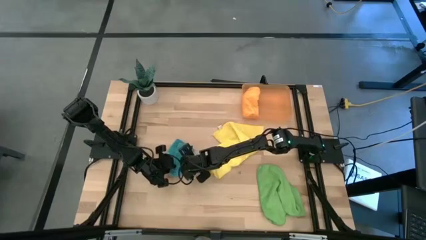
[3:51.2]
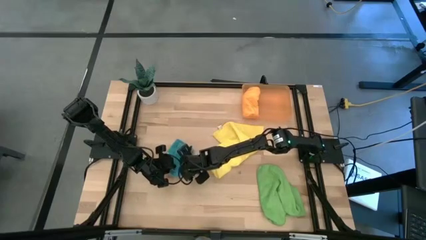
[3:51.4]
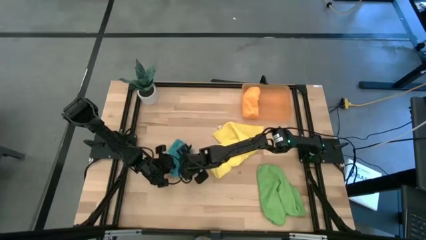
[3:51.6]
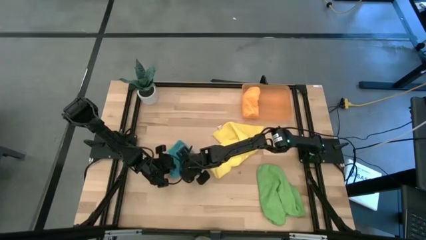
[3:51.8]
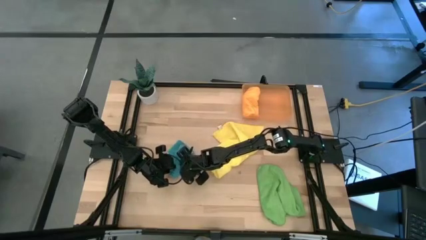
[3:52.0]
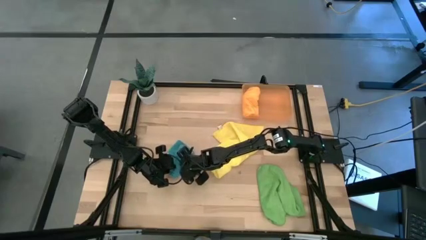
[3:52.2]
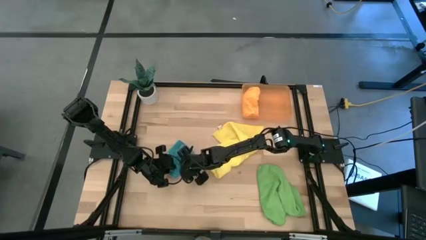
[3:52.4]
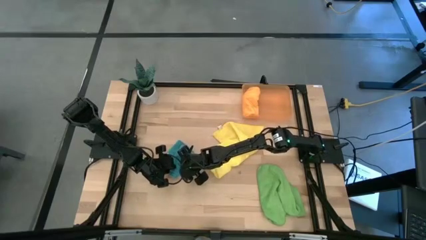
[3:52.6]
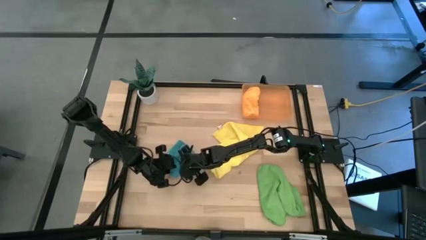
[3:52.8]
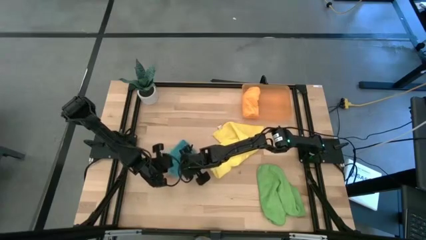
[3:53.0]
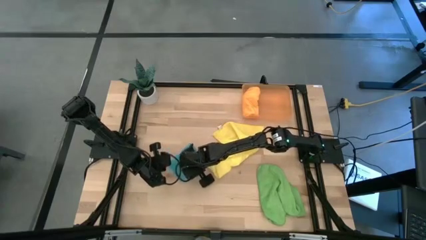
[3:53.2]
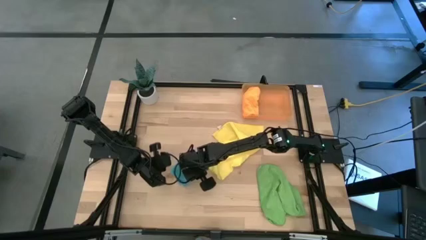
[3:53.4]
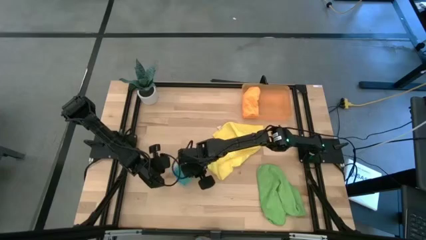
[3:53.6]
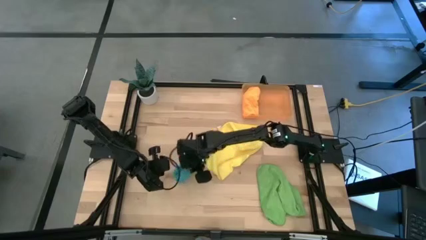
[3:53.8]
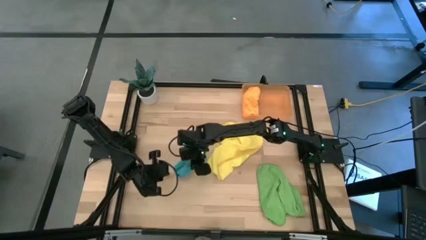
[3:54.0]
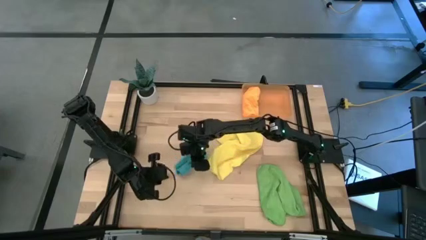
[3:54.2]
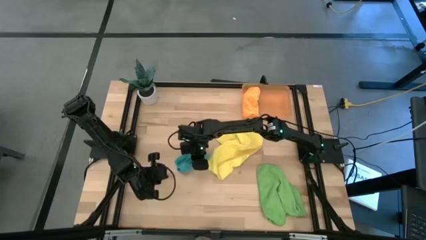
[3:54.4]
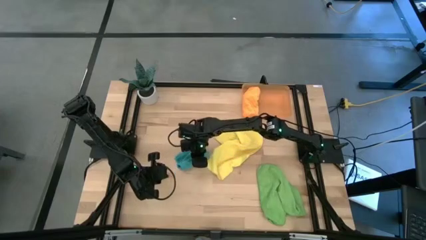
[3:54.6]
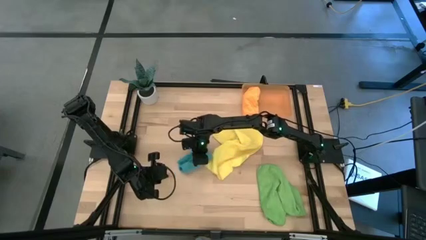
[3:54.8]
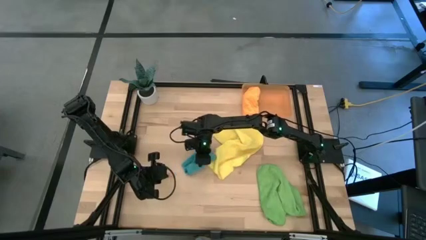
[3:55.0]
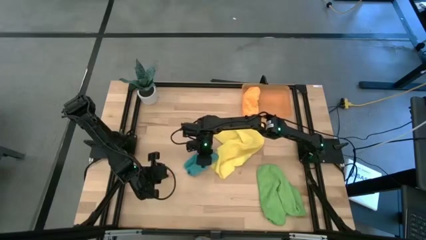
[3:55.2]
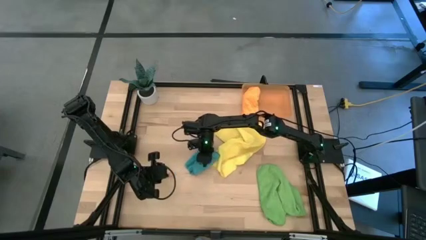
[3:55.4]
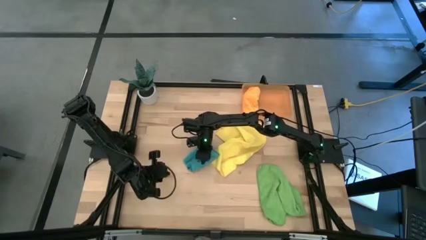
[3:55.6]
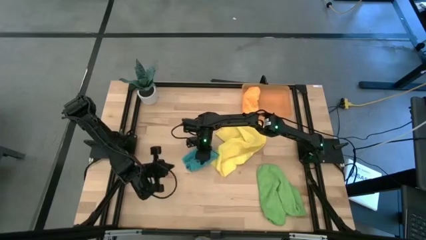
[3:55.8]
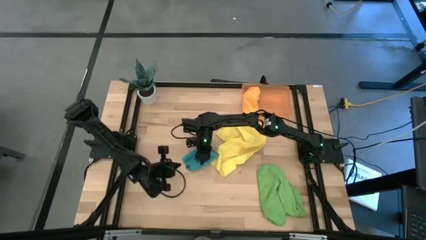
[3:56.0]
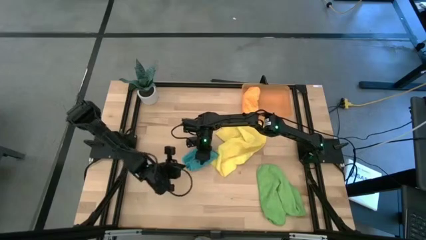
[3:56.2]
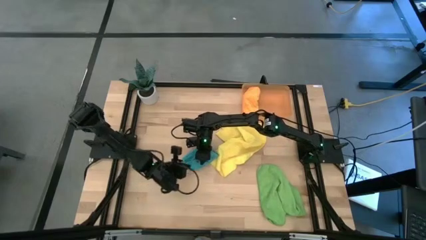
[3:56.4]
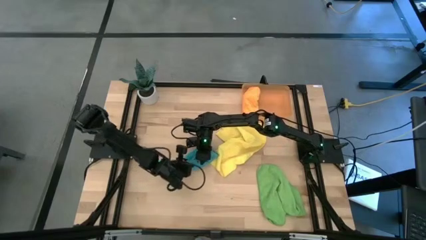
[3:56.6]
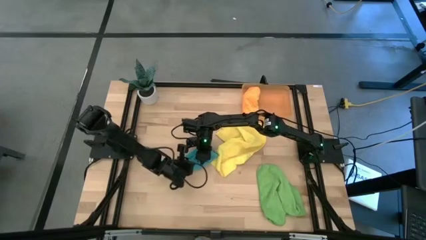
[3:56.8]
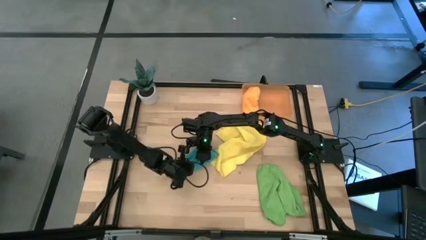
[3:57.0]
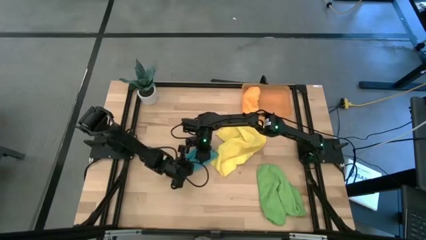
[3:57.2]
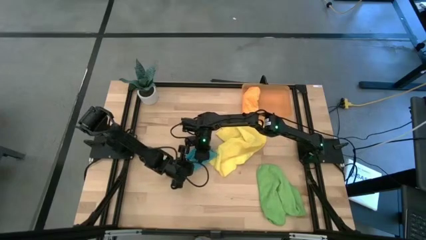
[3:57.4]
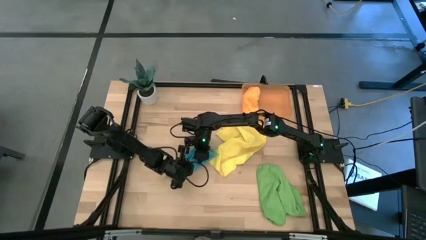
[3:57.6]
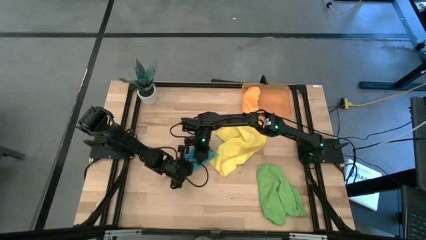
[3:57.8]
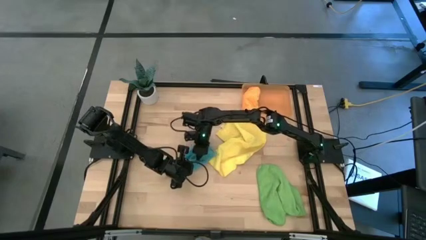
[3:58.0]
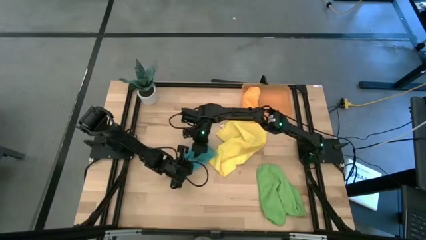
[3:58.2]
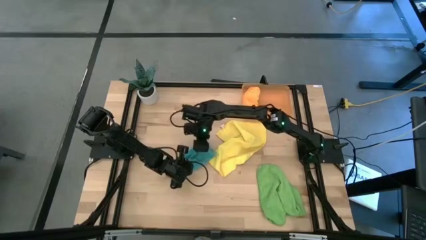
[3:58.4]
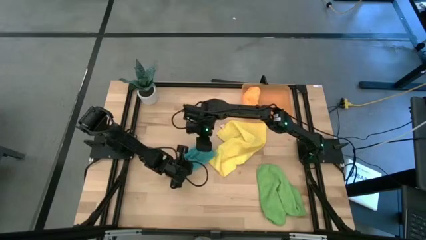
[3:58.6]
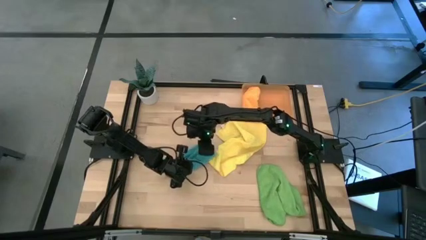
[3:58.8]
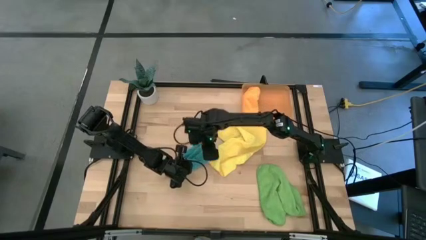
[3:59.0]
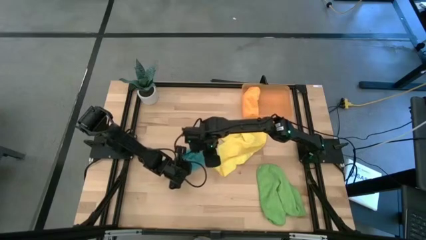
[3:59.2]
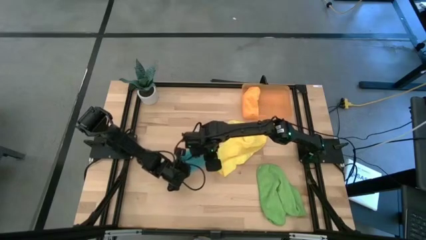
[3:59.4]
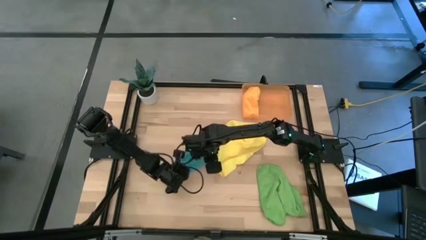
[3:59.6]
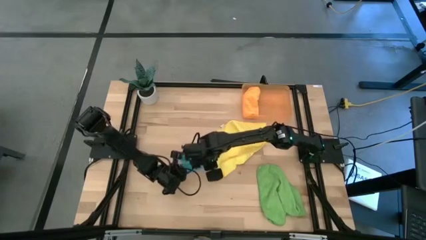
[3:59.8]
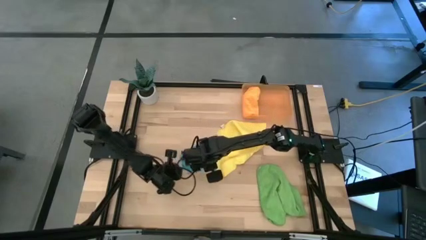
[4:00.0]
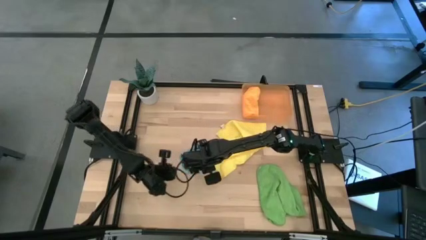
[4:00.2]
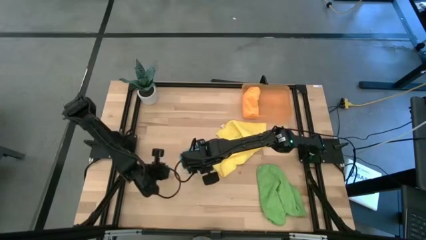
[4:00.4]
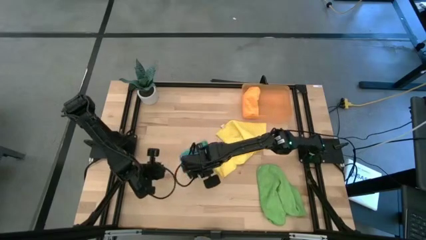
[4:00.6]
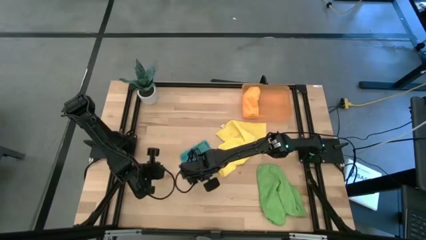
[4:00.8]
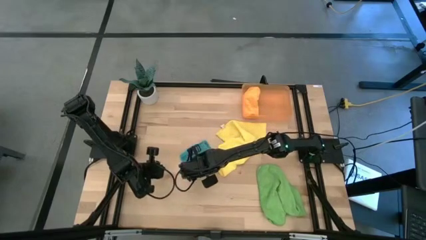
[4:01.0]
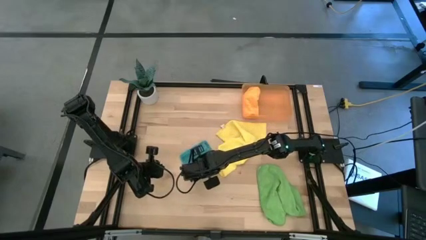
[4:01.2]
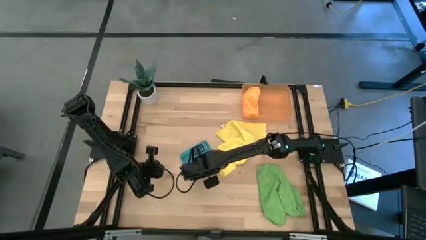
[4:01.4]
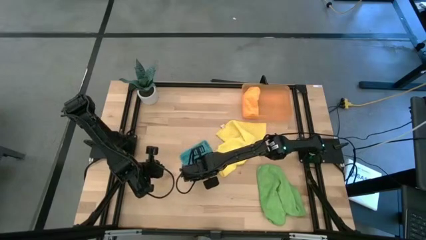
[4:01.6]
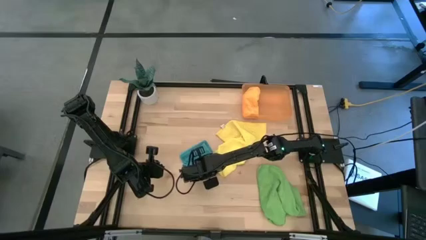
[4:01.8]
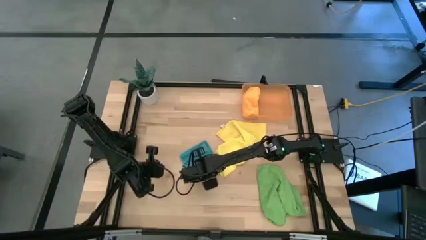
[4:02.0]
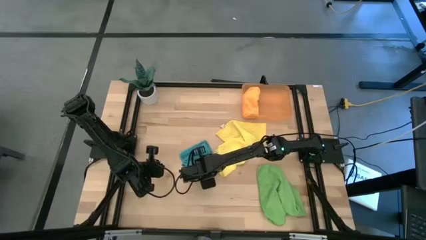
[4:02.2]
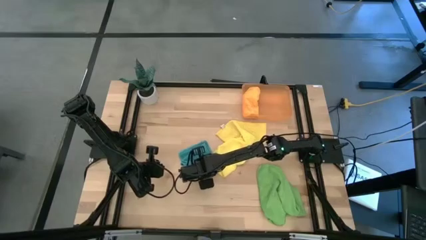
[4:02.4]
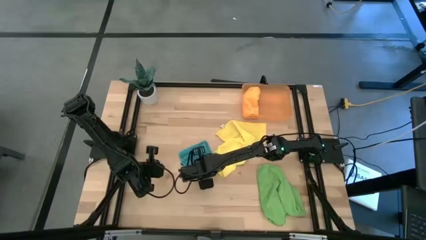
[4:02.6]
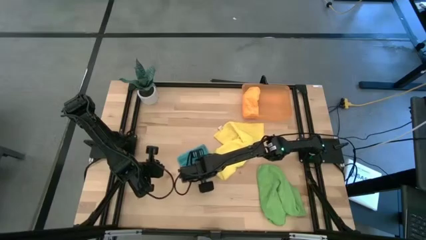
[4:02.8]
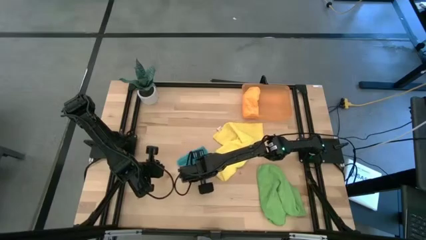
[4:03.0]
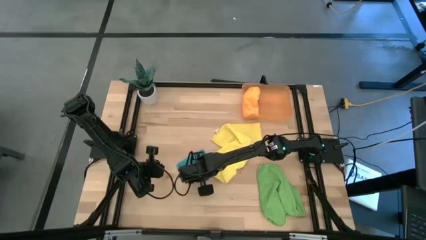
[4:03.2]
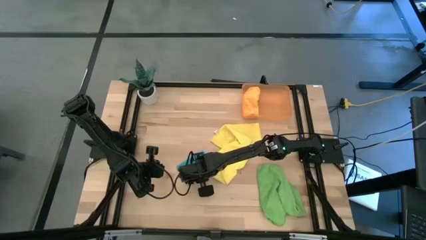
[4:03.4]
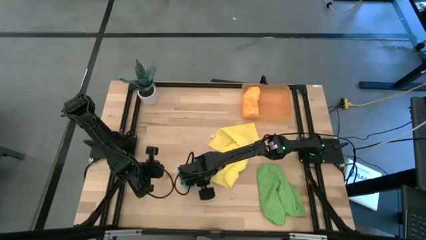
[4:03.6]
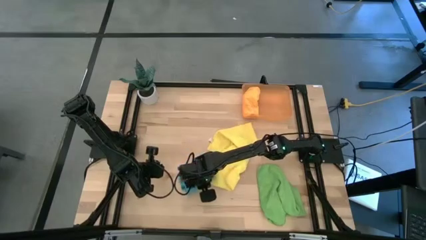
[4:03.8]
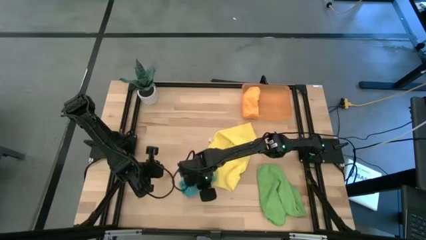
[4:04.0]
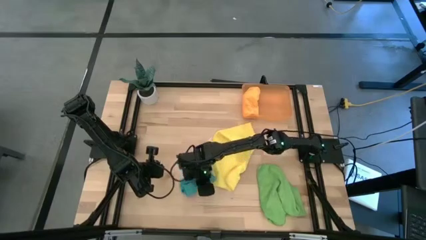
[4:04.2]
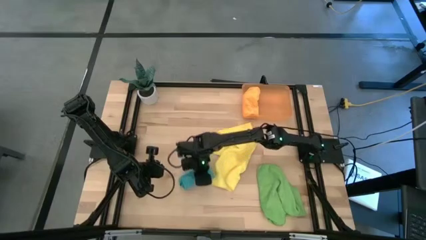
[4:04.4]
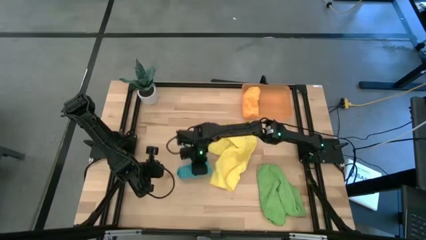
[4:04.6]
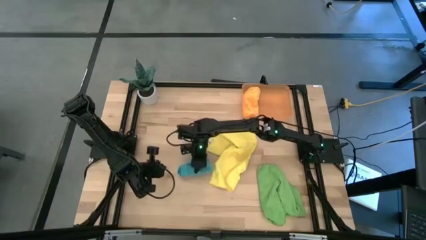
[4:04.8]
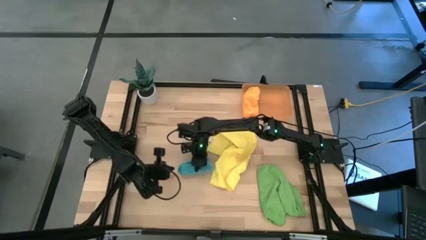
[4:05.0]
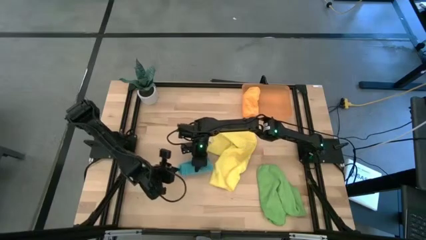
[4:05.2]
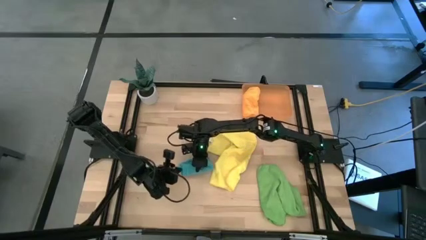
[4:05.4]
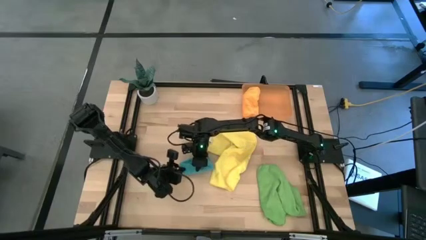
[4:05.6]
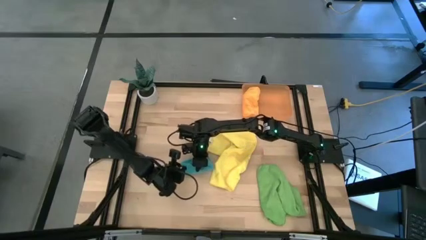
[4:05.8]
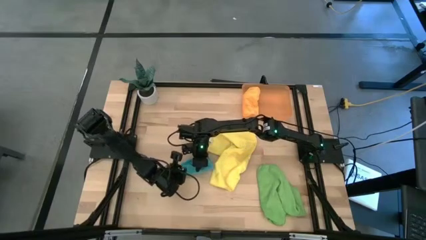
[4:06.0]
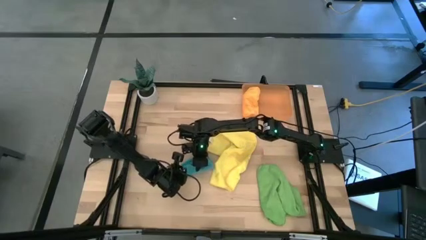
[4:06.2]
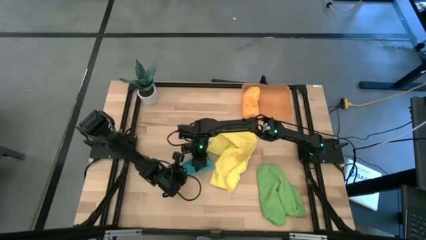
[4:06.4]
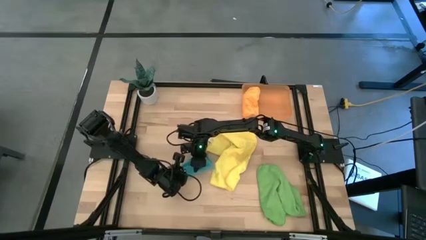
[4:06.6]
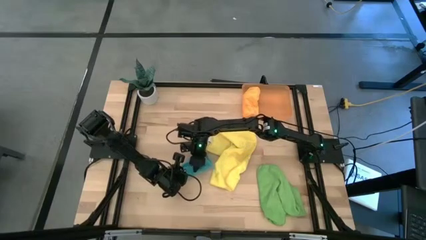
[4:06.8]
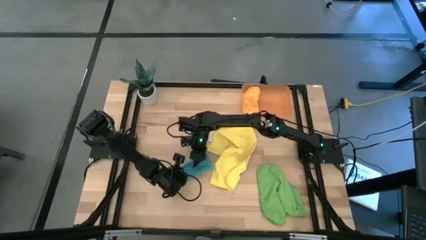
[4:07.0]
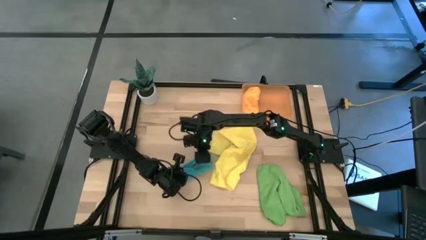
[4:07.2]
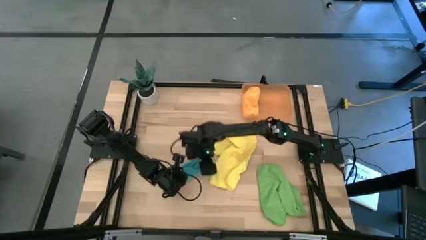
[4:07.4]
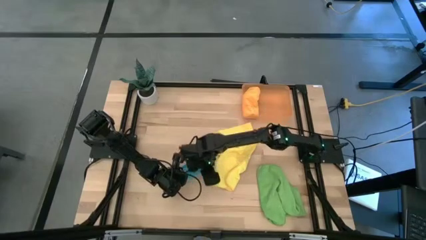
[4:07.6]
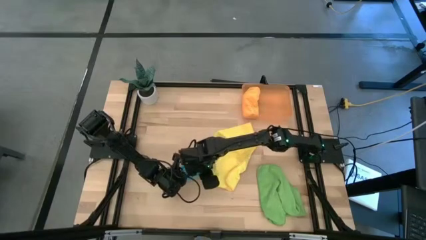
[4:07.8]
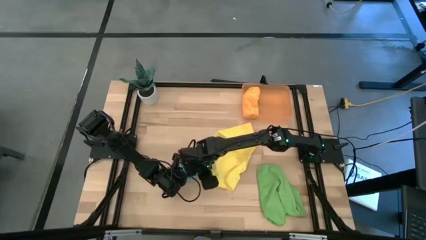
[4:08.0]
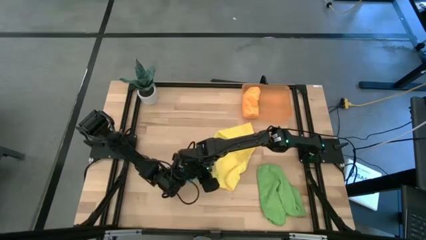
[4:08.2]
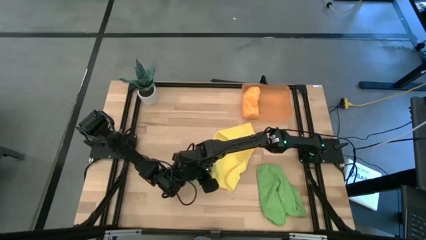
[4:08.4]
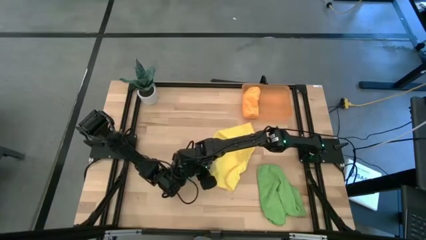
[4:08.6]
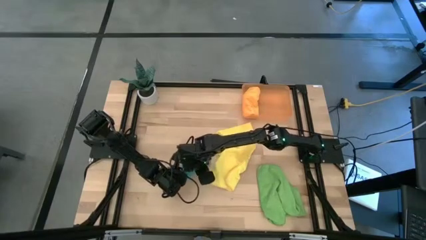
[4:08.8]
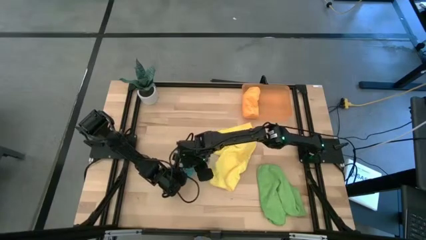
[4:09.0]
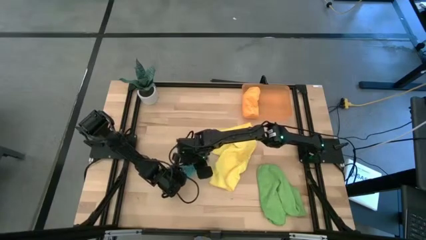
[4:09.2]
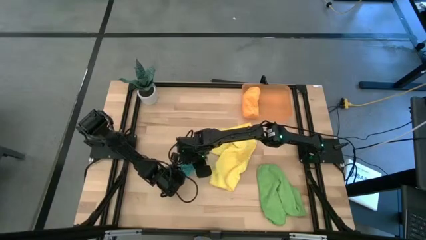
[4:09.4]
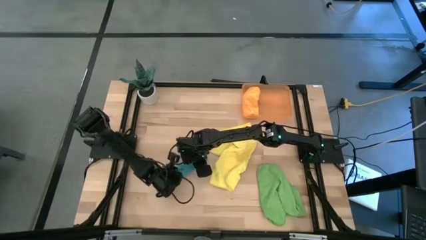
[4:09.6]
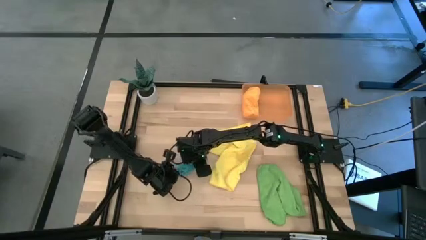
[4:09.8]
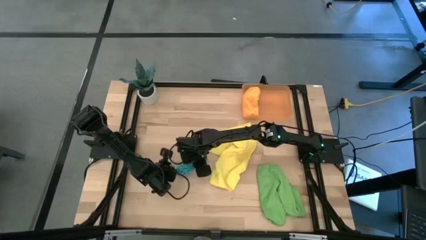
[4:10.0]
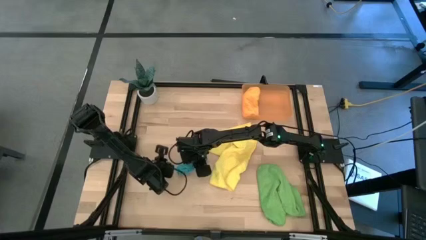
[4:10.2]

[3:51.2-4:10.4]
Task: Roll microfiber towels into tight, uniform cylinder then place into a basket
Roll the blue microfiber towel
